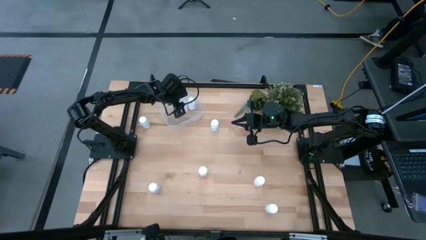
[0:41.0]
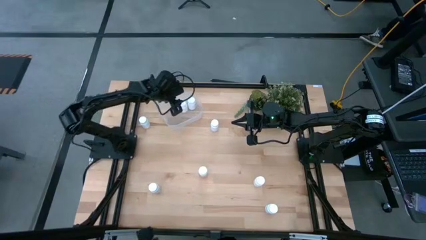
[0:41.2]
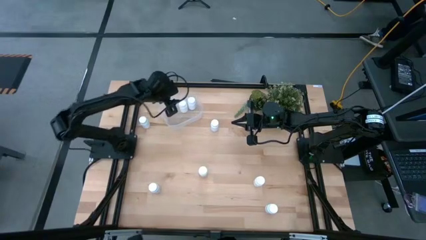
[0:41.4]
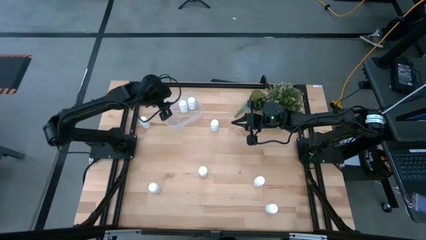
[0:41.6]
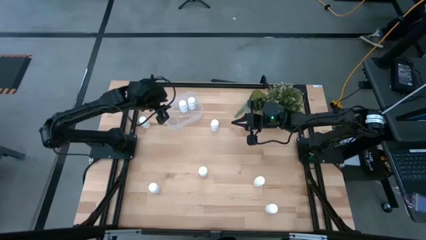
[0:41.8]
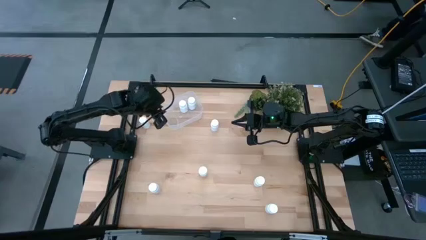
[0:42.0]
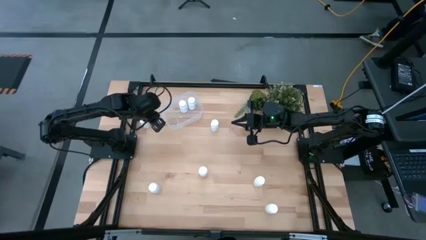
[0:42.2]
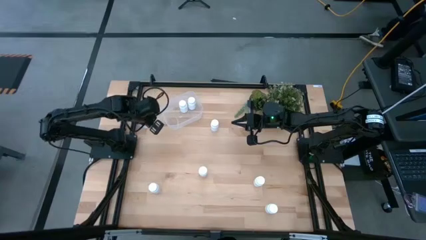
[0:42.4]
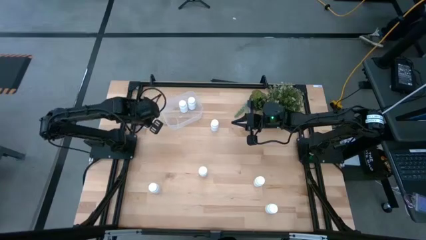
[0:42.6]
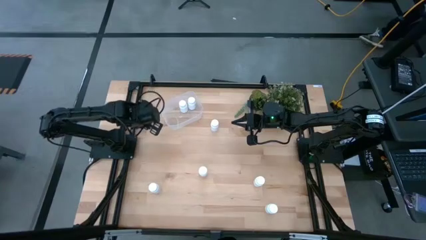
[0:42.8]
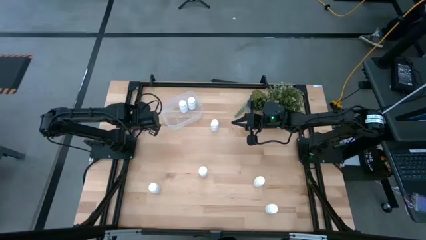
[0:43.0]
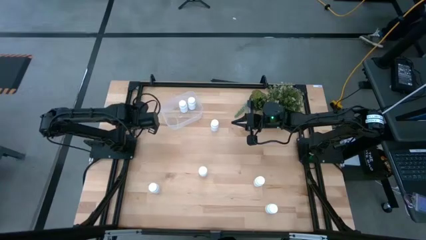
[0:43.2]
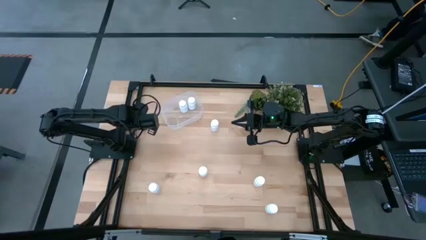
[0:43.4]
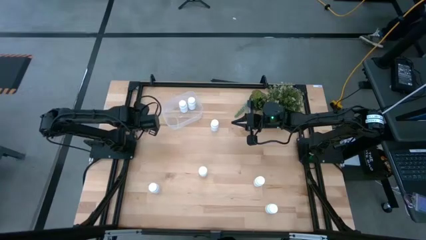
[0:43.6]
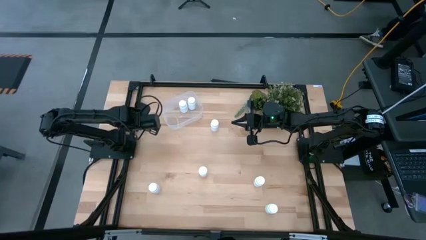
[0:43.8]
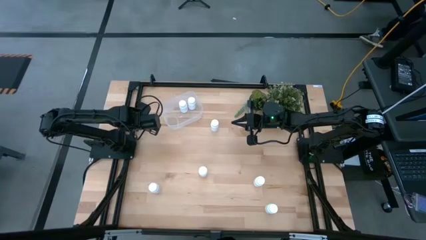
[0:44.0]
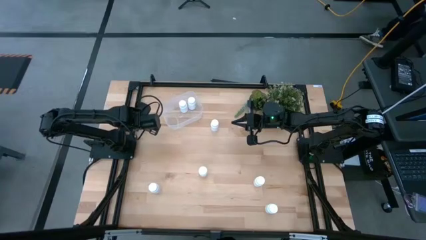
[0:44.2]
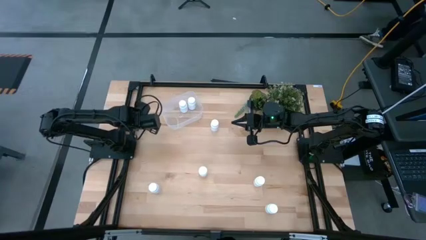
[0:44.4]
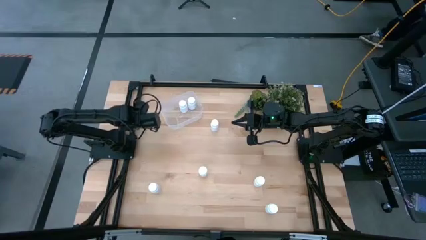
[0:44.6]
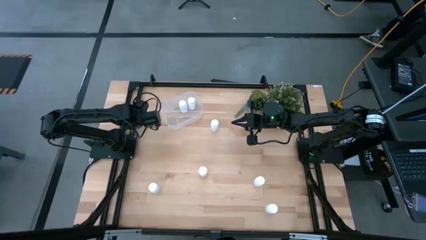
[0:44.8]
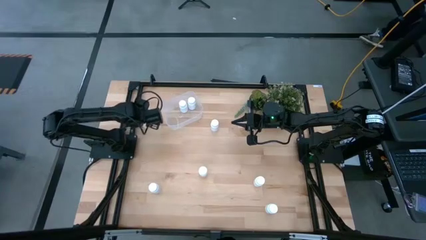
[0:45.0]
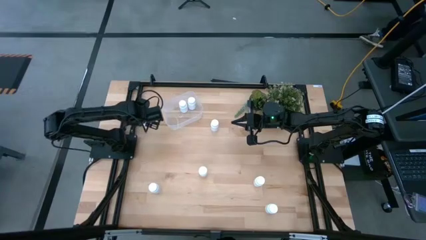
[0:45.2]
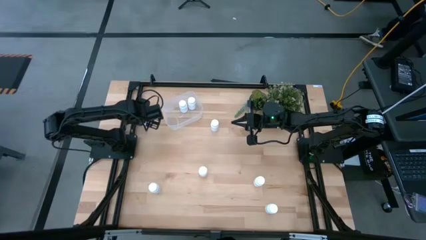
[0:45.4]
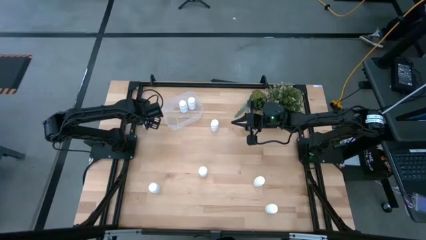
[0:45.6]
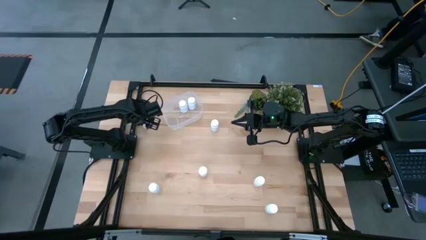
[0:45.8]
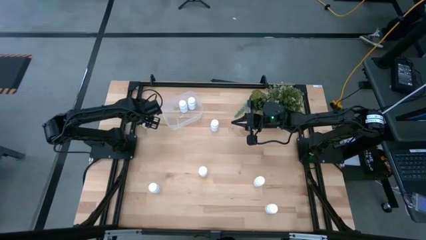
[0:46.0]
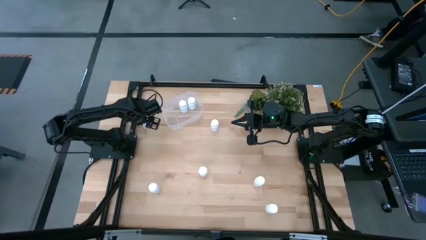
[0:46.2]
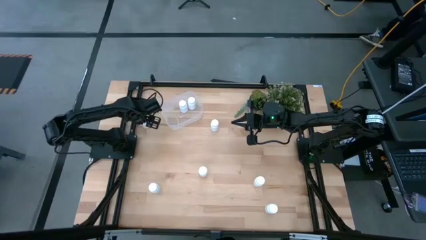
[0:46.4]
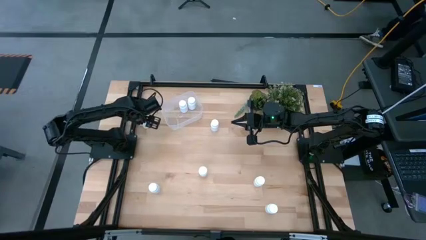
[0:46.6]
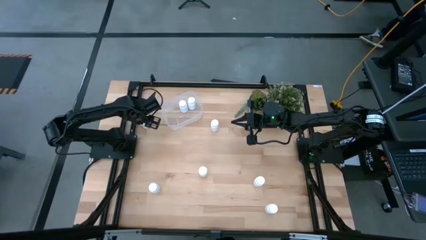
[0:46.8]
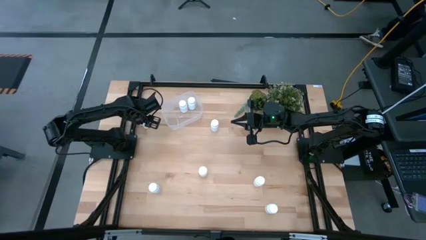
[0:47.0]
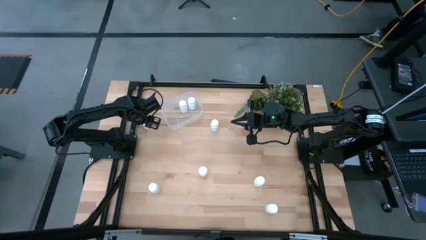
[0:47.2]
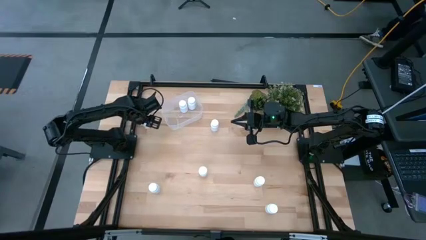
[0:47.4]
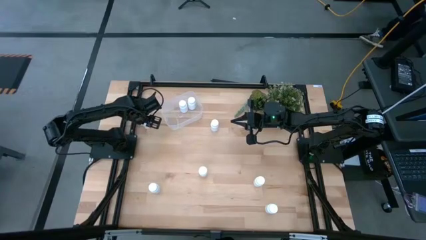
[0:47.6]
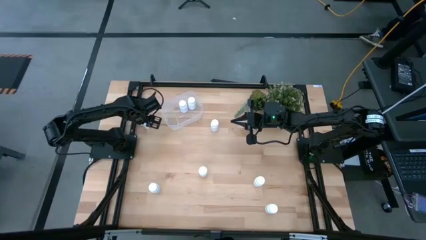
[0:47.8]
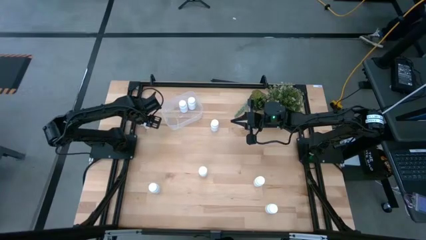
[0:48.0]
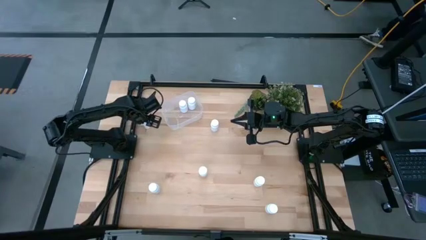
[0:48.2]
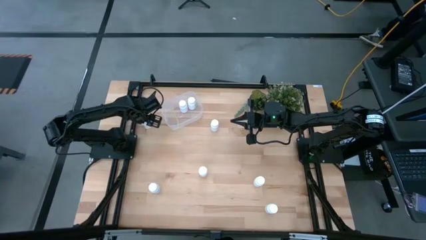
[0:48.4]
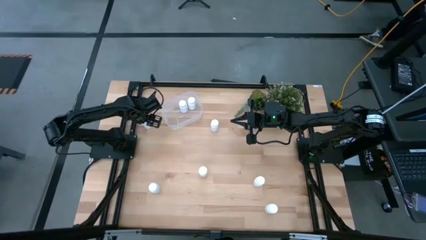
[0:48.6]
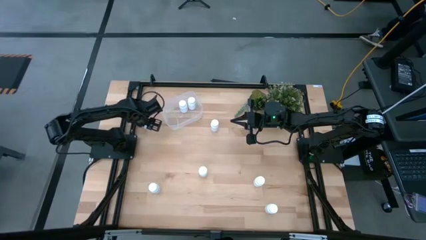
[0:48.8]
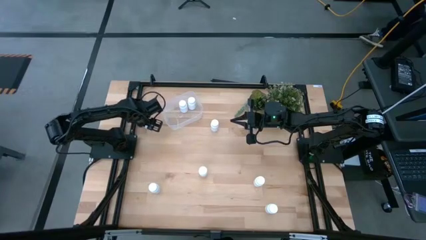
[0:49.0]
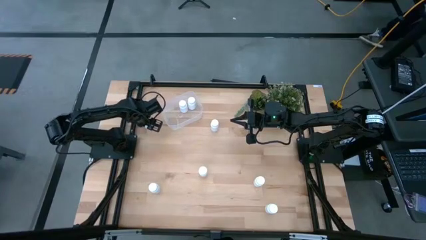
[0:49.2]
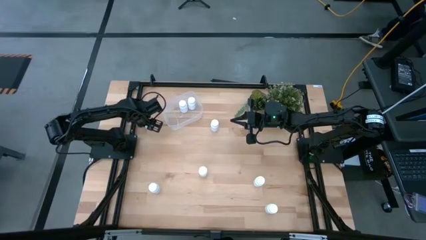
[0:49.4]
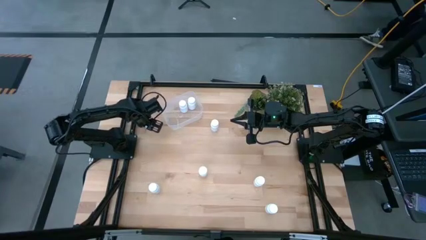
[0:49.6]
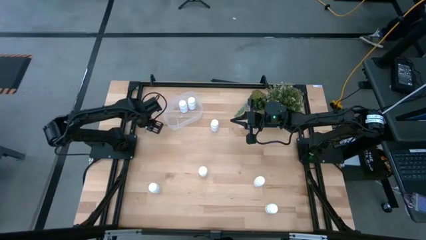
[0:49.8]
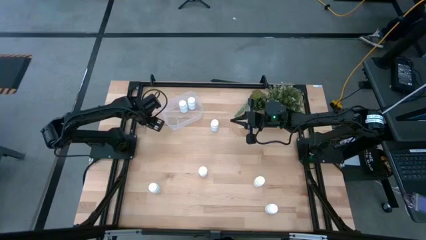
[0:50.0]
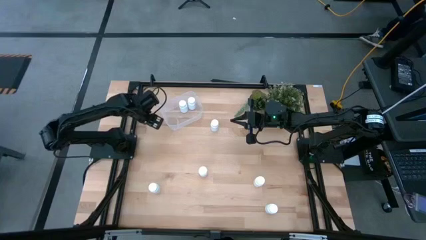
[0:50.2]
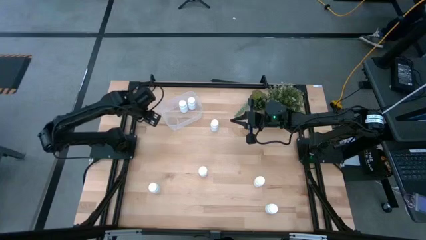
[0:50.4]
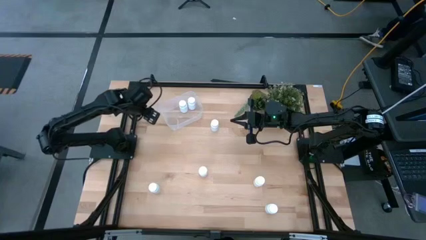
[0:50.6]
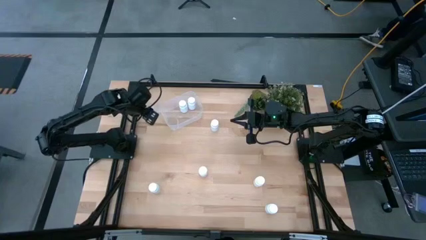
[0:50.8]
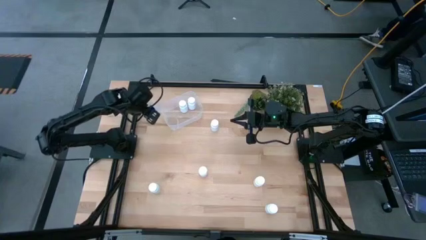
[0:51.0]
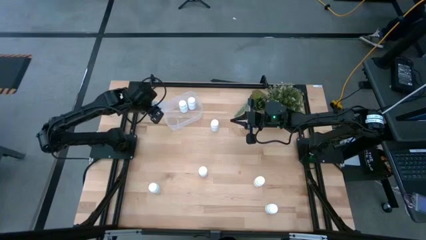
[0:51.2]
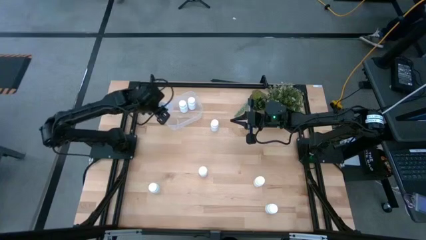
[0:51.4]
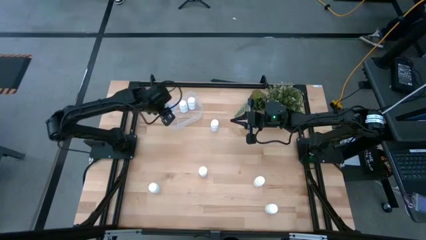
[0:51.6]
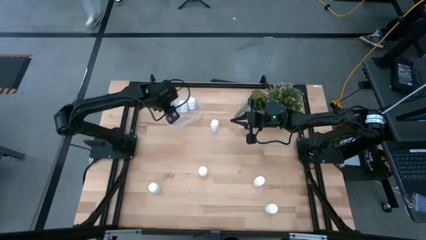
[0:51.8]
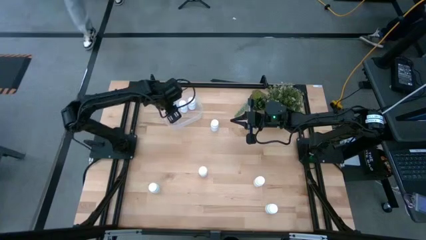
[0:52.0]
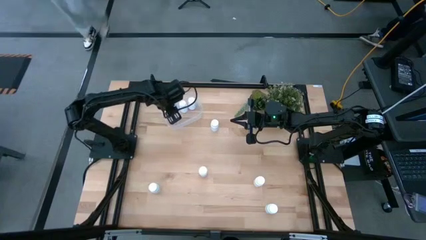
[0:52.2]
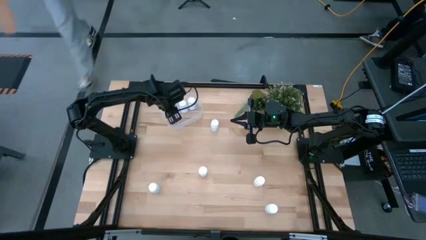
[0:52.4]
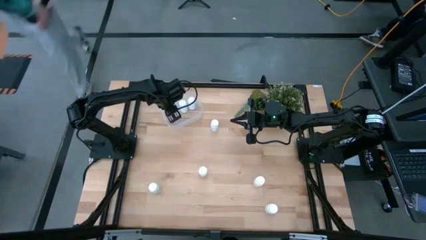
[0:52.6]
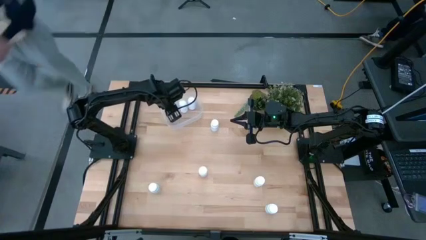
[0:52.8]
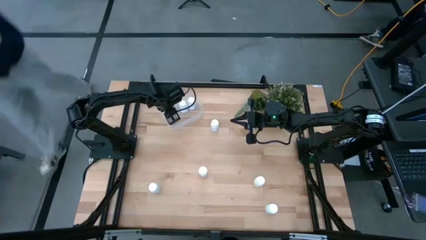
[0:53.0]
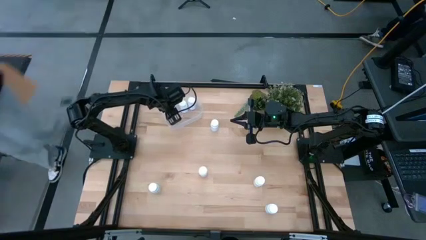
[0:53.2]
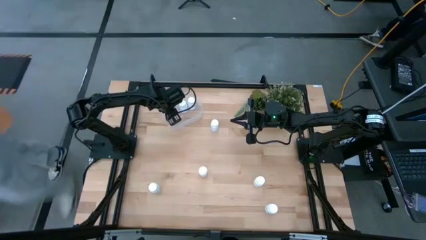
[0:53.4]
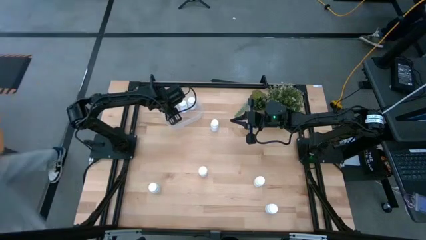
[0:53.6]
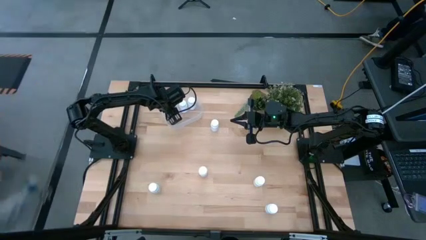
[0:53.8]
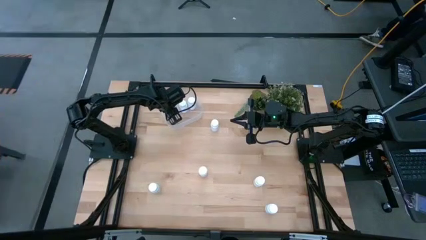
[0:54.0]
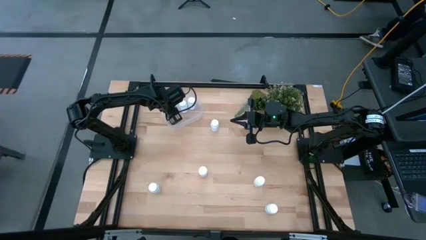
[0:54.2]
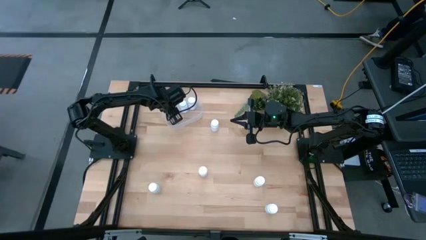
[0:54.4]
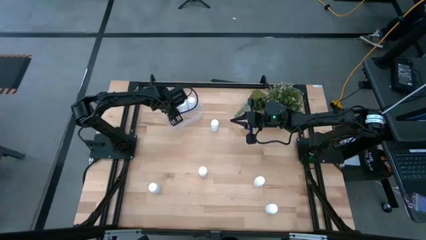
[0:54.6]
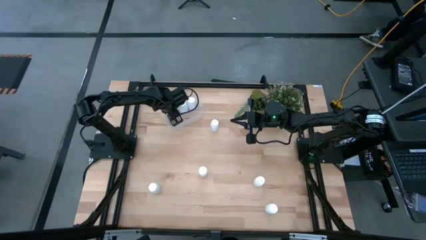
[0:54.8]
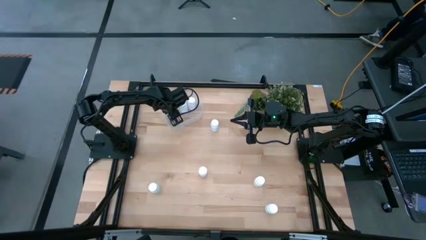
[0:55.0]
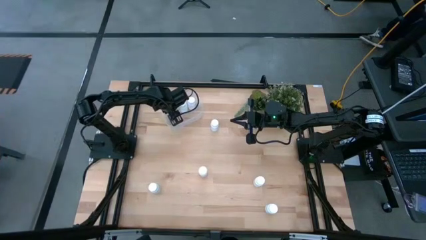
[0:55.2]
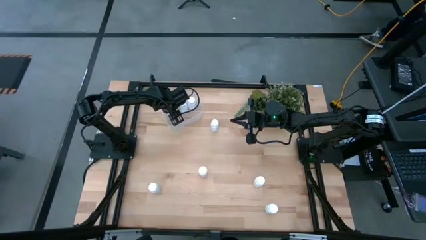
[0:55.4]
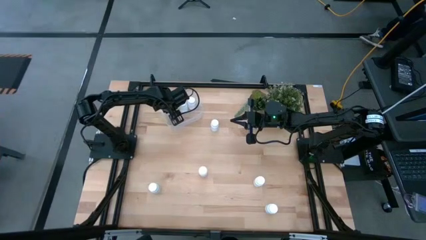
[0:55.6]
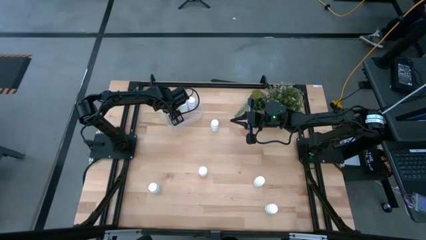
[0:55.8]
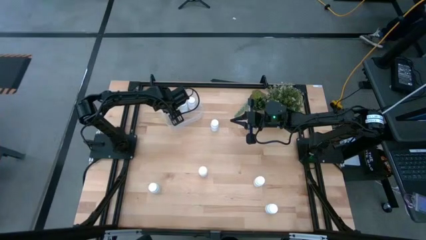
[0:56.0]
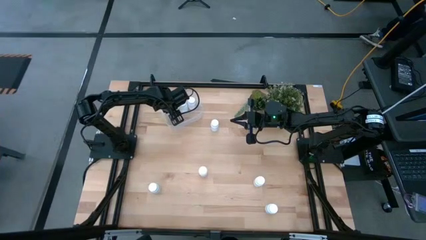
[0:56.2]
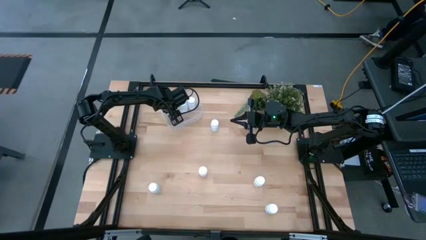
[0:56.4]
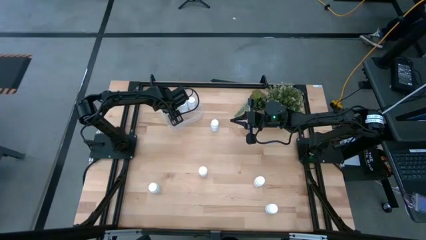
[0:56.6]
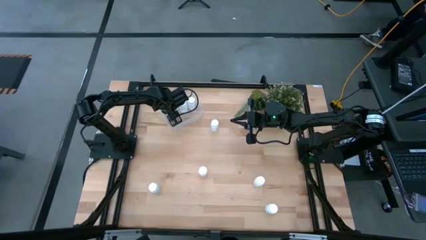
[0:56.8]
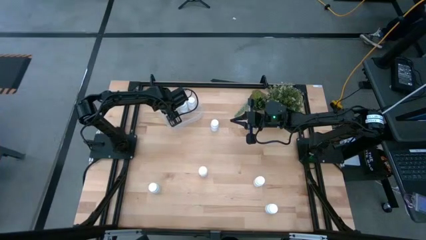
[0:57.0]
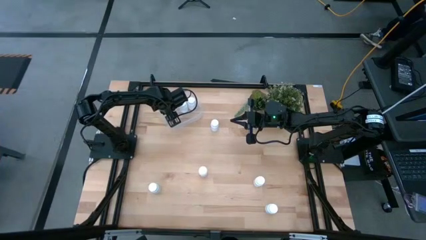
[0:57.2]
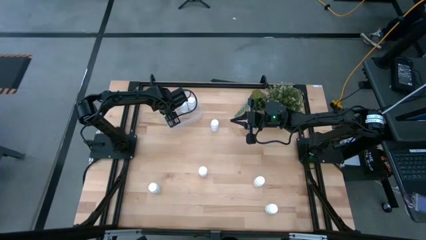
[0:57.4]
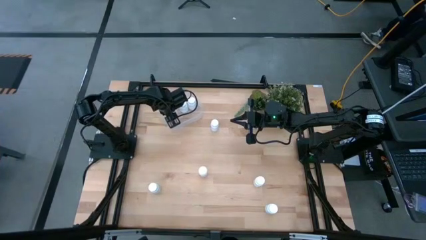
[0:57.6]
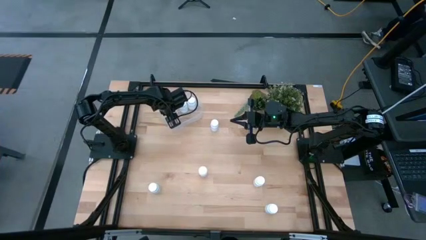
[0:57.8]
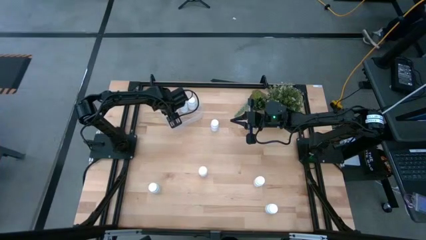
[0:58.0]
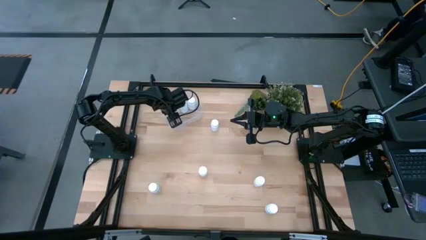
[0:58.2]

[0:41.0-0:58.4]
Task: Pick and place pill bottles into a basket
Put the white medicine bottle into the transparent bin
